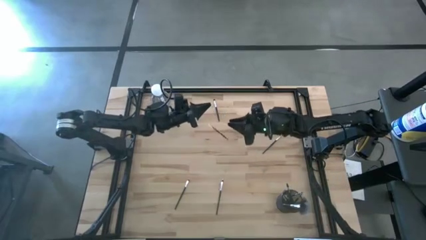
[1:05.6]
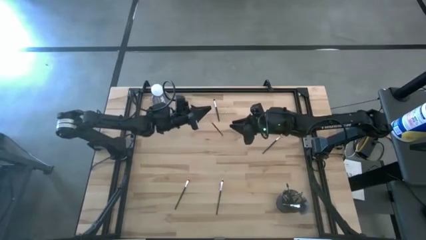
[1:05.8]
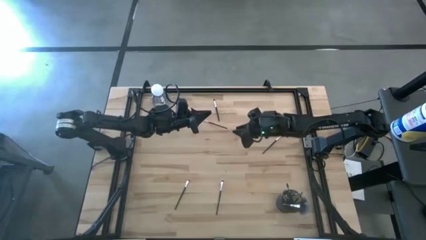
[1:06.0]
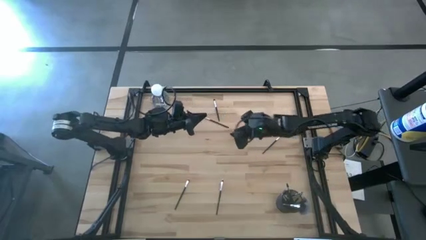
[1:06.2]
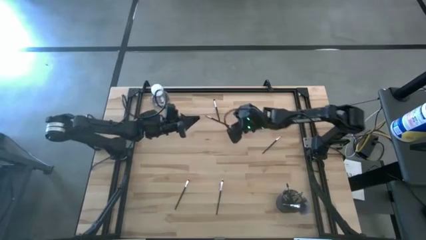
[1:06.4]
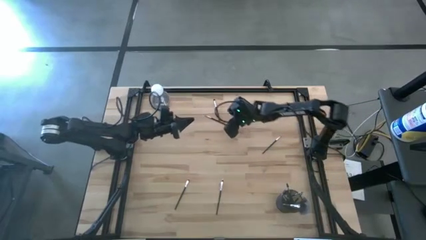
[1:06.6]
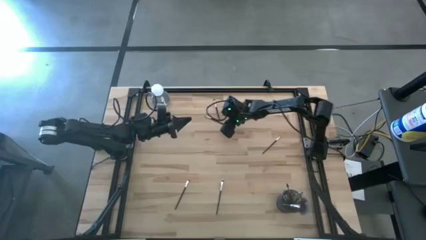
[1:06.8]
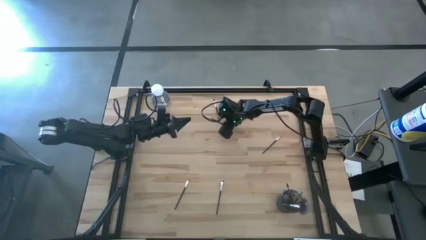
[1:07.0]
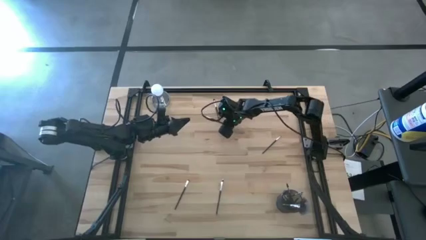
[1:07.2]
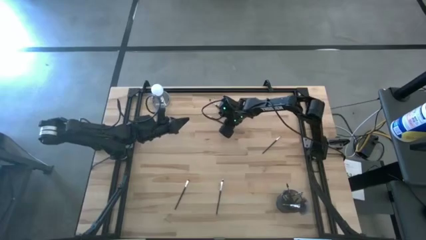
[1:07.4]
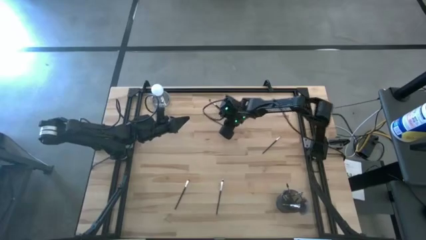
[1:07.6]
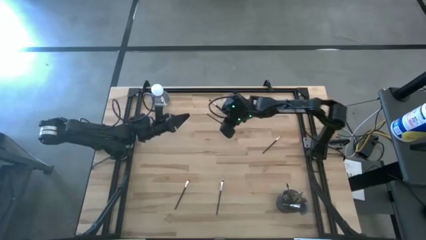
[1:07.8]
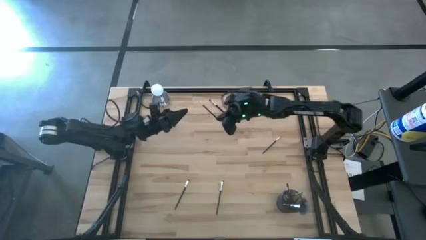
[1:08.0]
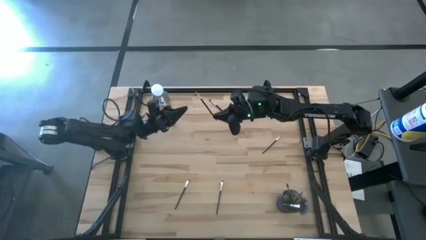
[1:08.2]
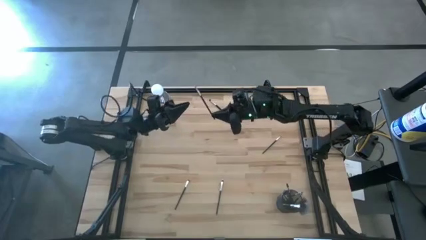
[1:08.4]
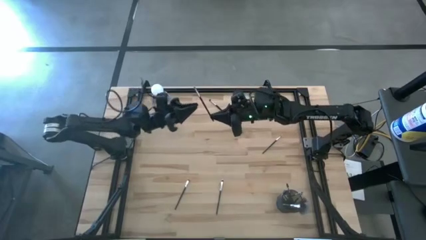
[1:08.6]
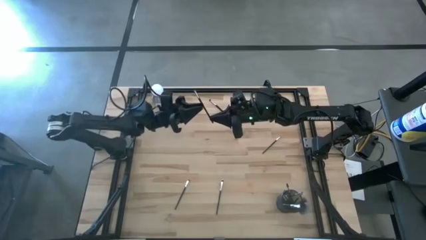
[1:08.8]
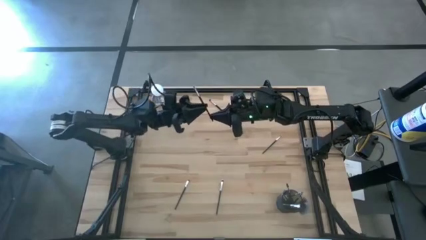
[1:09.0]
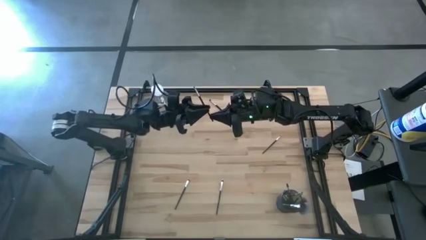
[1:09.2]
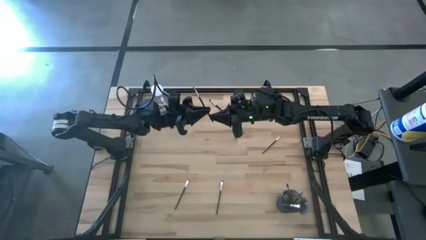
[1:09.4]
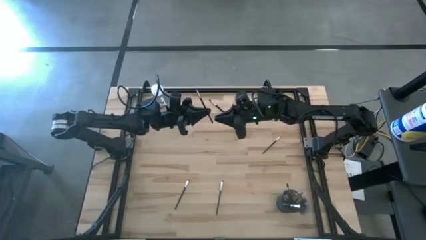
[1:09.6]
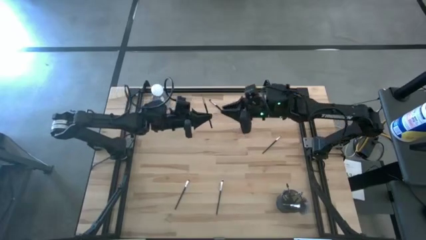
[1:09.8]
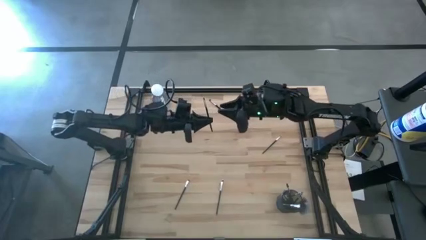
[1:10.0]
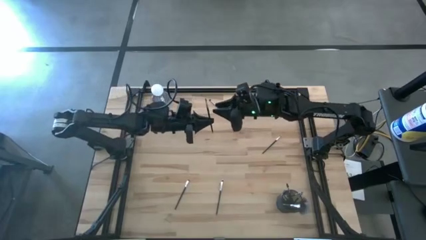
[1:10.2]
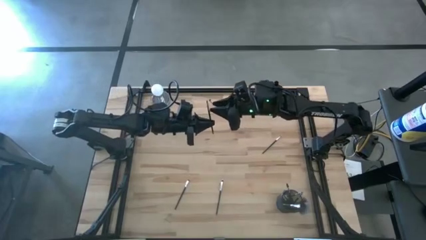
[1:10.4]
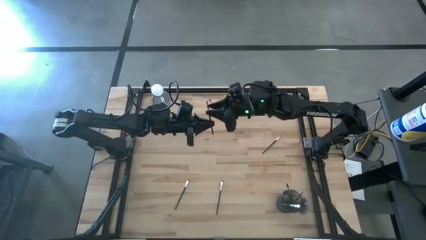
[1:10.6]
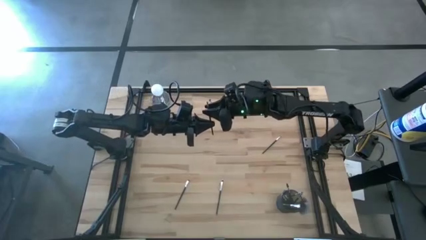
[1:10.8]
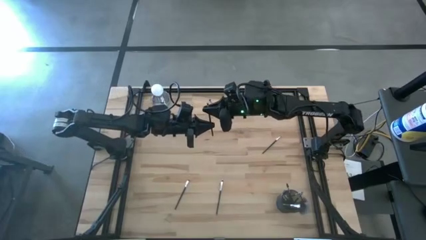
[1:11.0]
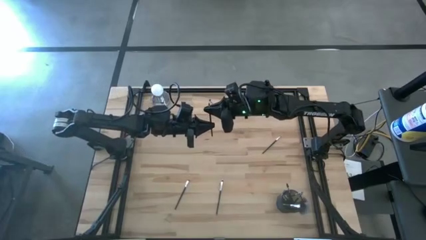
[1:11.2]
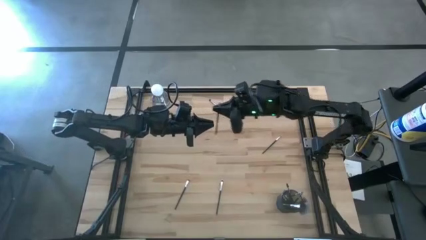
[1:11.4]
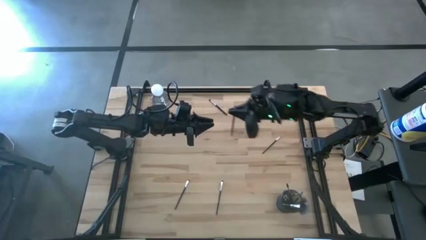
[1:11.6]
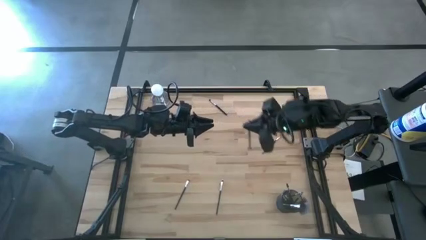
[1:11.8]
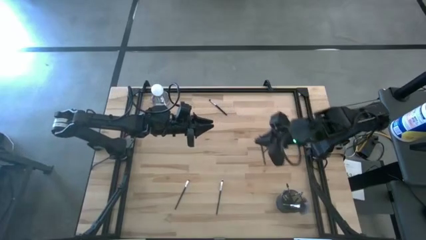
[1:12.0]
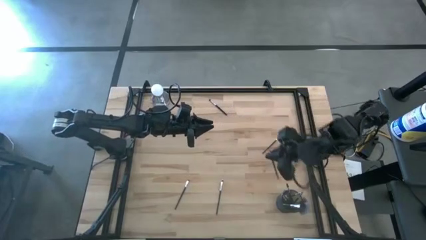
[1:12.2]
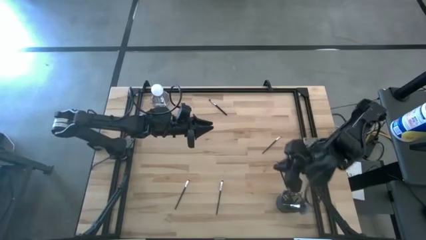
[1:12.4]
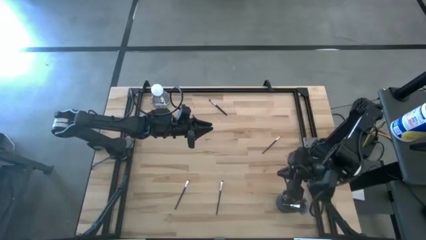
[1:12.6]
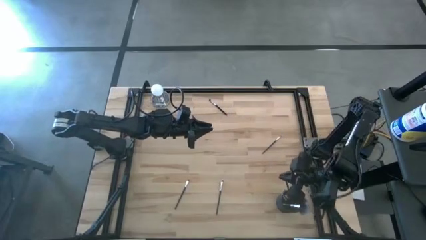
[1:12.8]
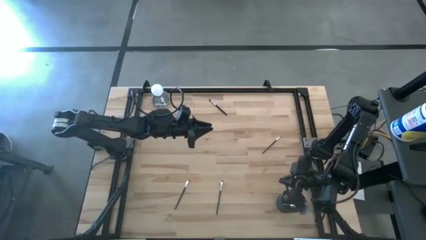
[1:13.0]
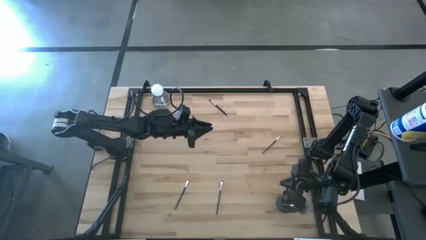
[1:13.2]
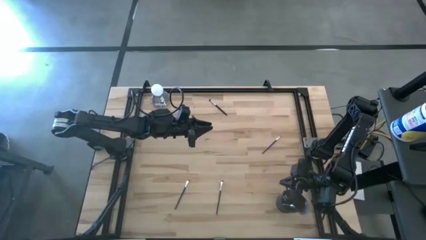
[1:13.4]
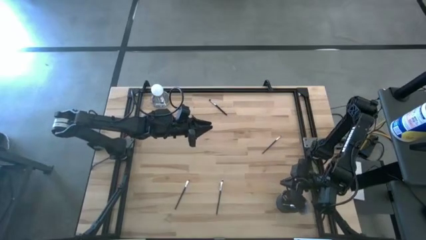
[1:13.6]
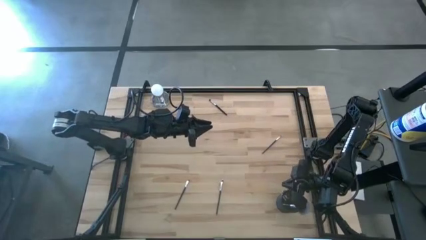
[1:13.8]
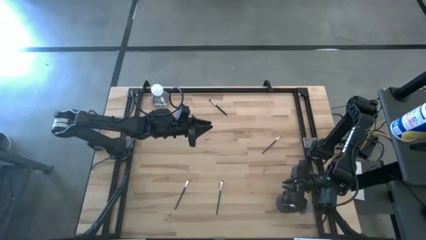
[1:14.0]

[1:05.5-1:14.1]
Task: Put items in baskets/containers
Put the liner brush into the brush holder

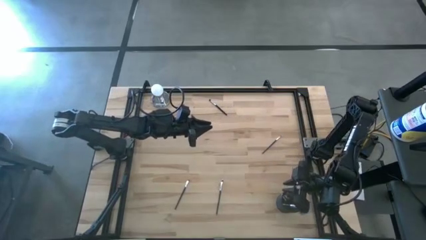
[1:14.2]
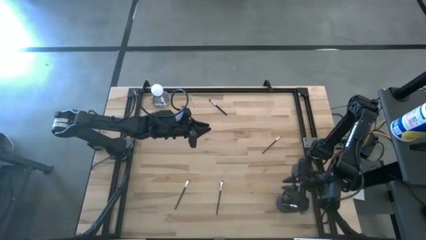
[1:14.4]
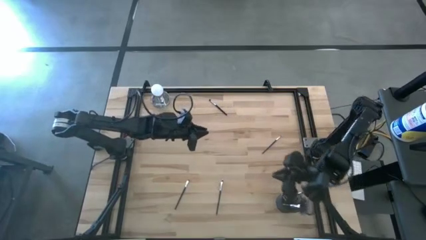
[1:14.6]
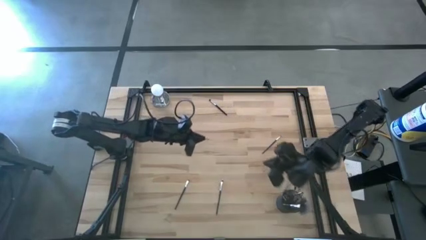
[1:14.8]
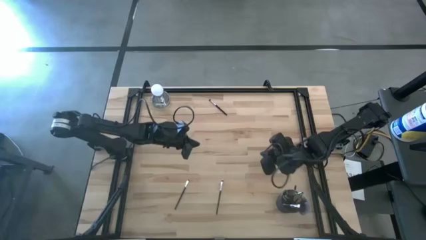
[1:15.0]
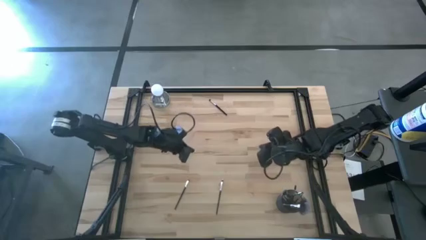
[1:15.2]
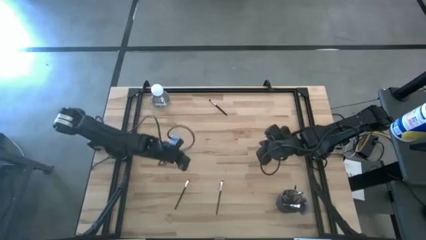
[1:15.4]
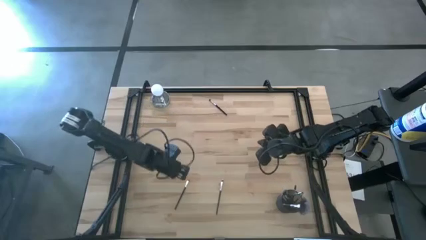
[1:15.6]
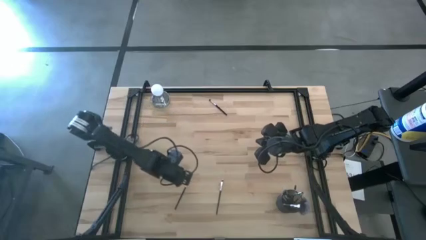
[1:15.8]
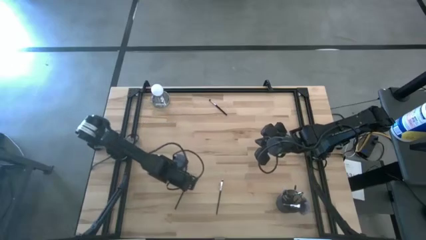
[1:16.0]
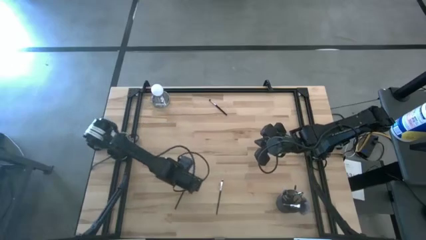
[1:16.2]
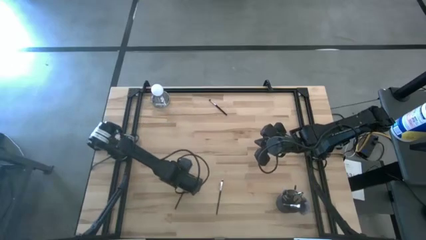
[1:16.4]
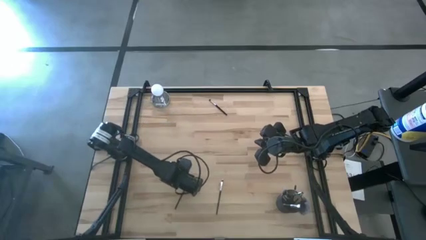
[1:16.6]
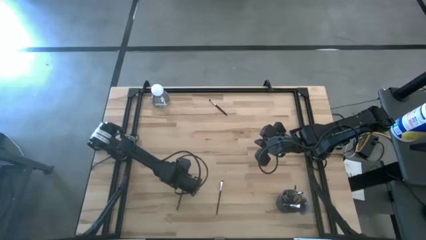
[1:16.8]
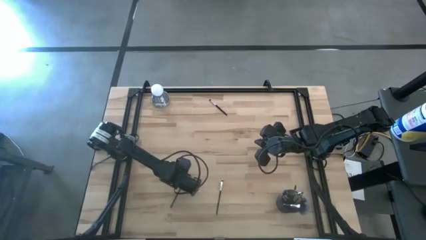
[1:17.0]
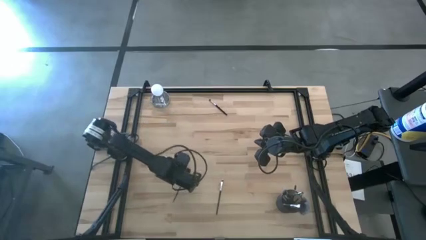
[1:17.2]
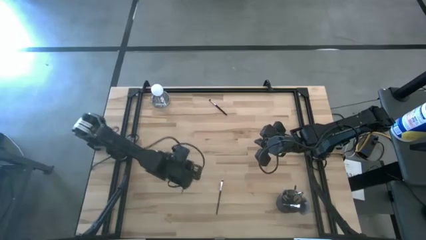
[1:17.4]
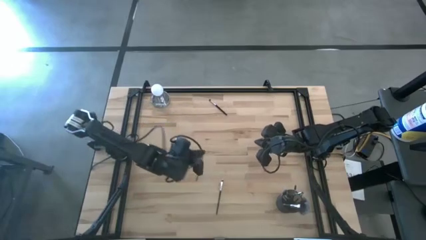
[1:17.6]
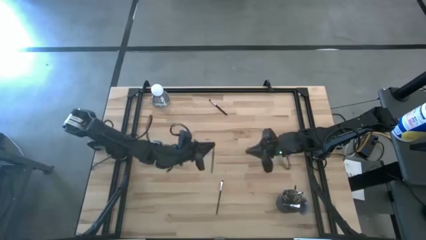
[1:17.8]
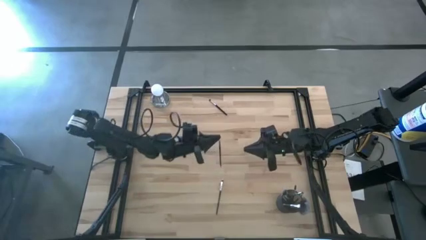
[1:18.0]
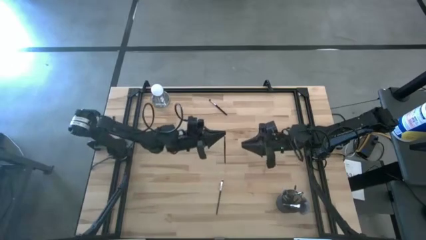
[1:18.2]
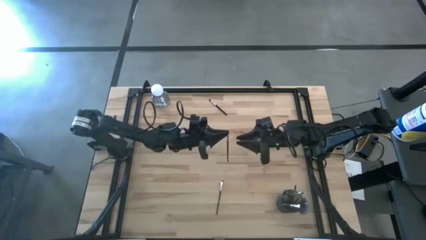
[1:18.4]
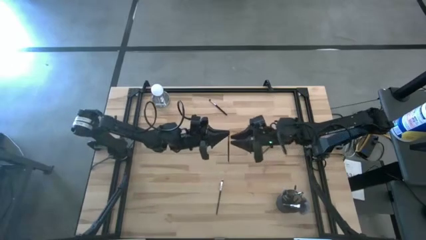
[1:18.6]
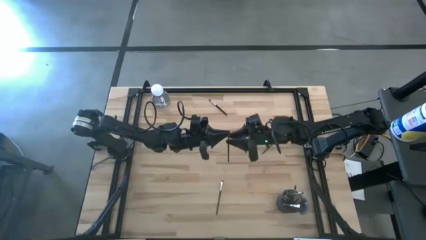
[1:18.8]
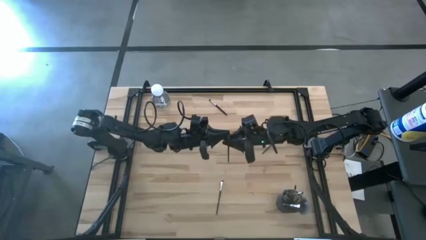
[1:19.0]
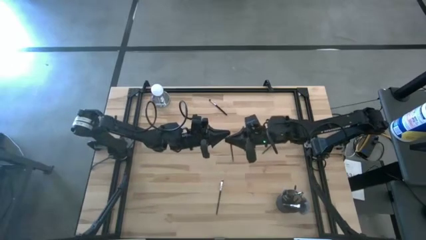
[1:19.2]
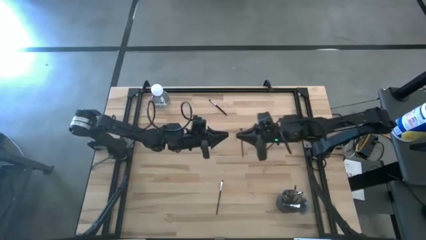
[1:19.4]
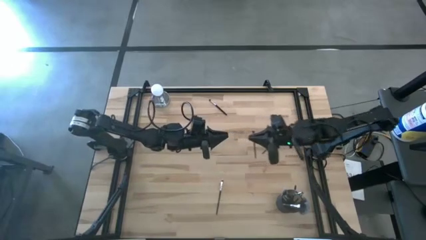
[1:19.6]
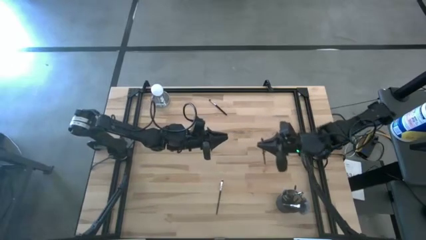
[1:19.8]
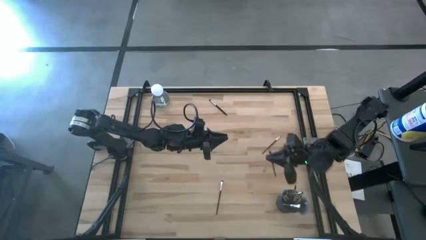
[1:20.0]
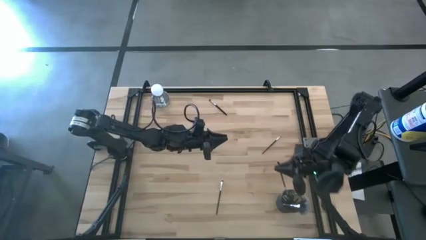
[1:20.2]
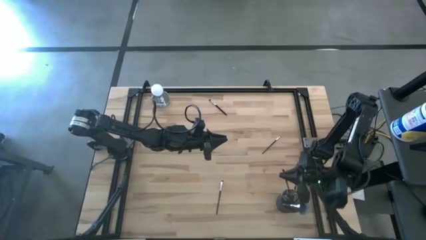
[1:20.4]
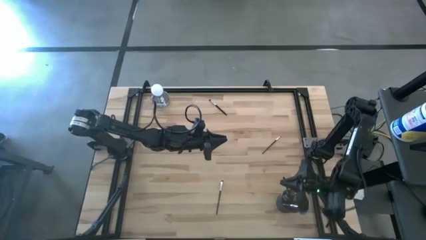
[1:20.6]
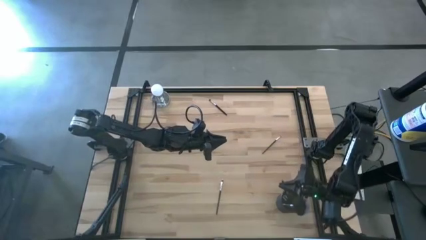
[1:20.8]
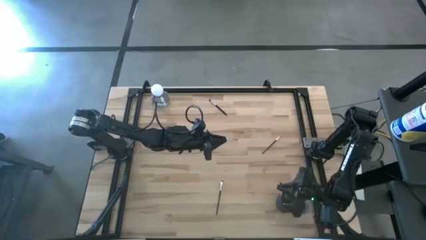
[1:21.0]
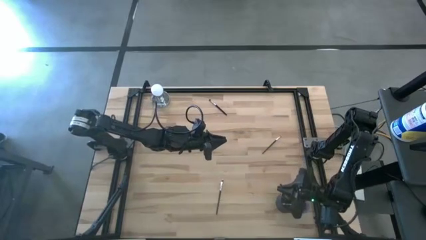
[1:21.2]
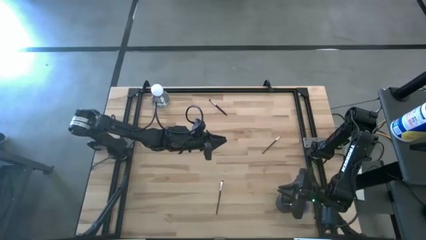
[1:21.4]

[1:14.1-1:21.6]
Put the eyeshadow brush into the brush holder
